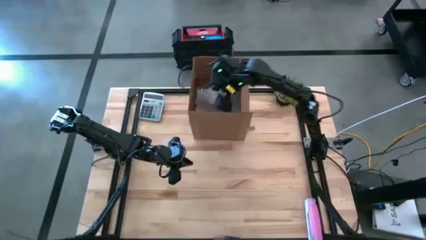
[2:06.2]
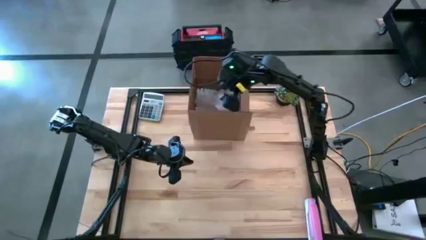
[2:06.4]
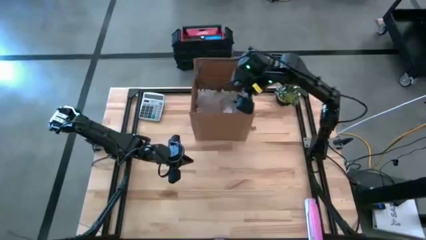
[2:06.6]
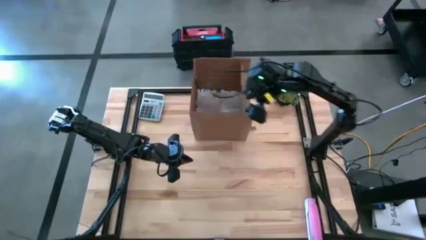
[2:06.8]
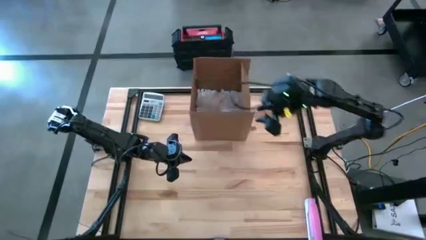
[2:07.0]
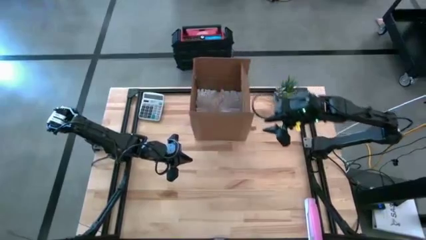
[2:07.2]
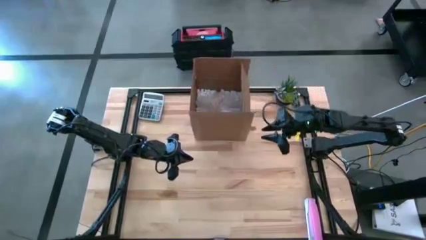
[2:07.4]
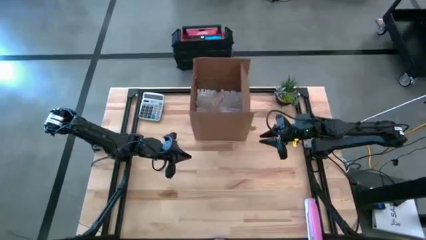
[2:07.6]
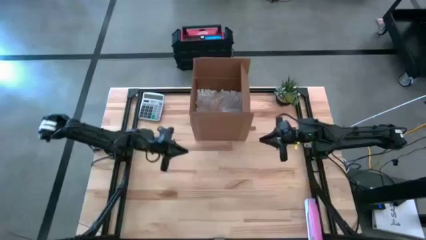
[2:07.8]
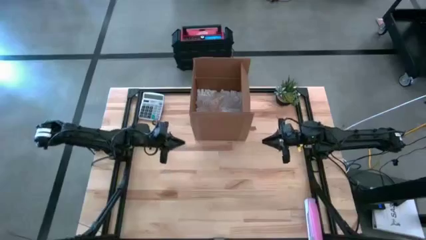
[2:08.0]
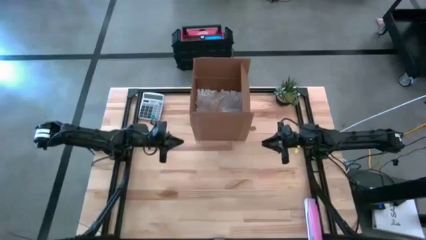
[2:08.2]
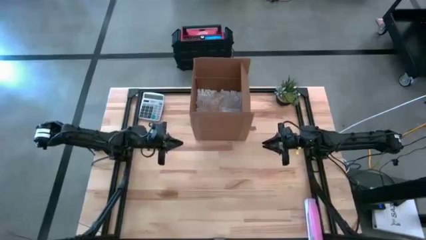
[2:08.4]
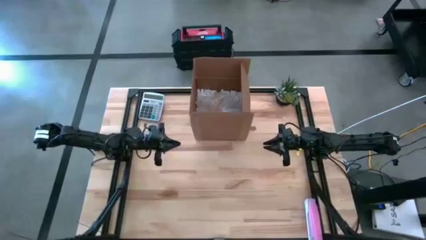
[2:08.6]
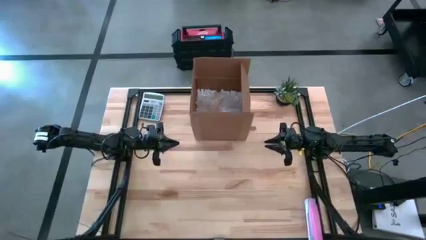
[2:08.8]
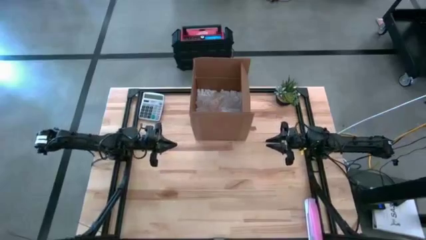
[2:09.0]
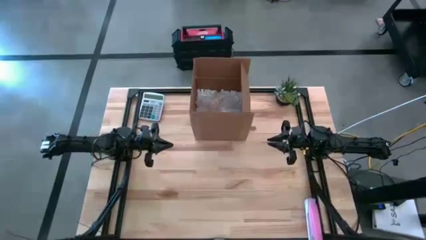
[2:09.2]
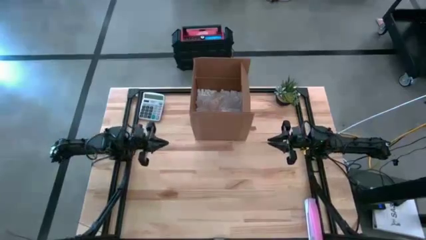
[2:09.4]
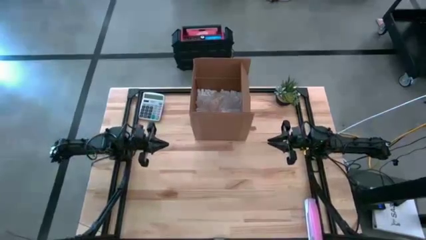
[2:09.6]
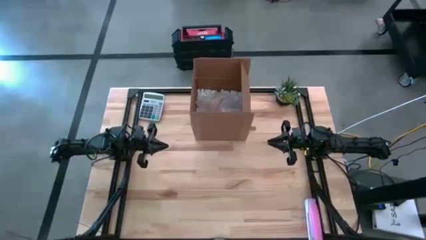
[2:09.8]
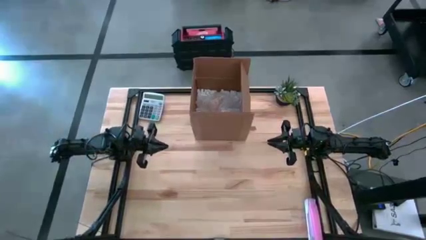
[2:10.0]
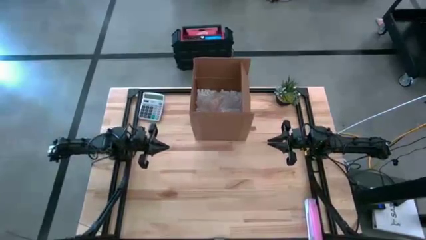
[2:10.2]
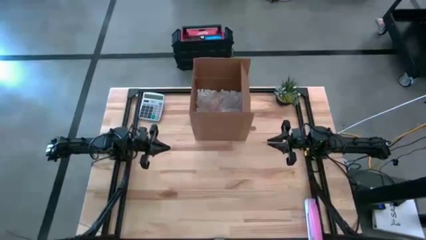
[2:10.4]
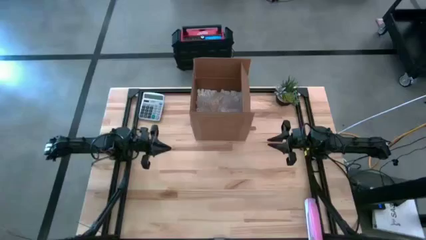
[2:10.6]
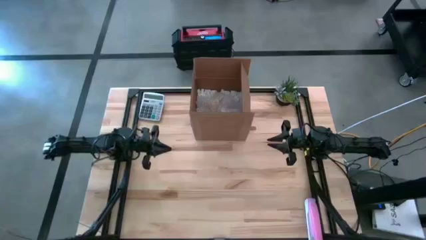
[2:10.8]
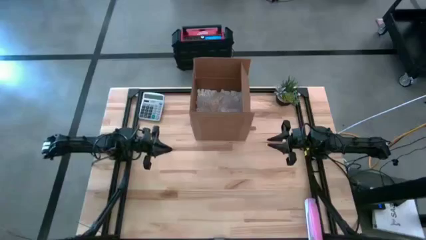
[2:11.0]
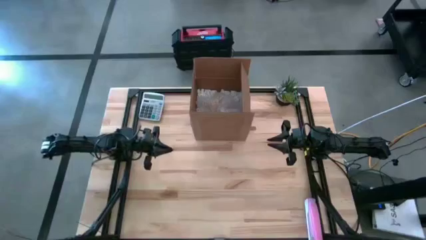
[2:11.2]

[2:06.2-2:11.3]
Task: wrap mug
Return to Home Position

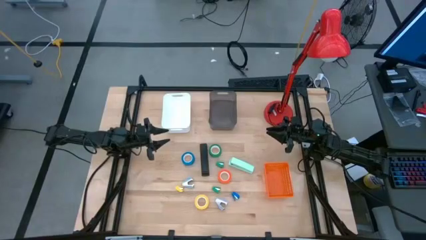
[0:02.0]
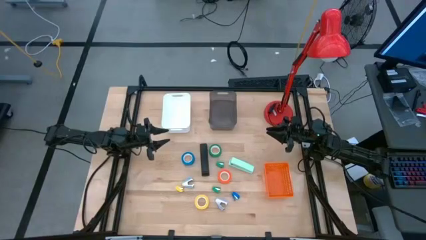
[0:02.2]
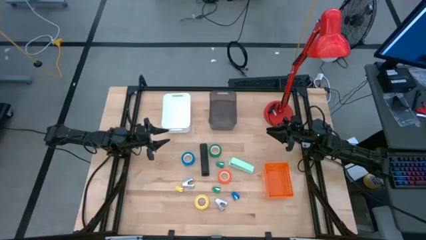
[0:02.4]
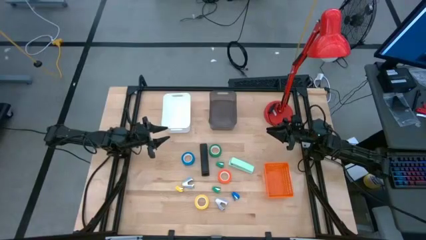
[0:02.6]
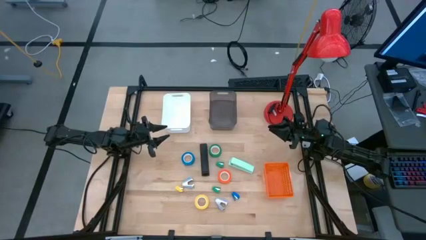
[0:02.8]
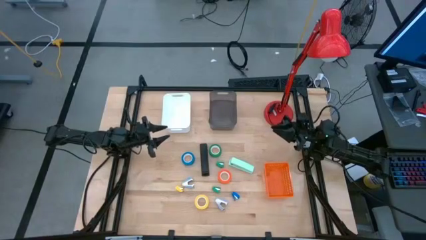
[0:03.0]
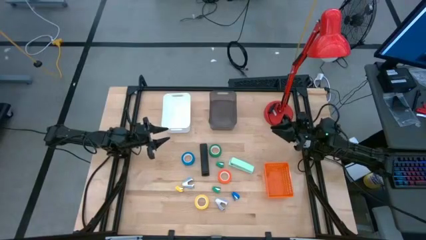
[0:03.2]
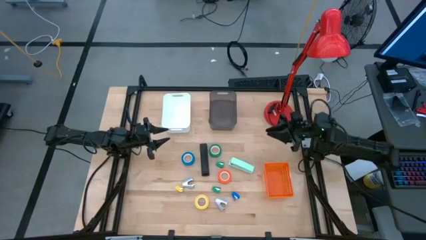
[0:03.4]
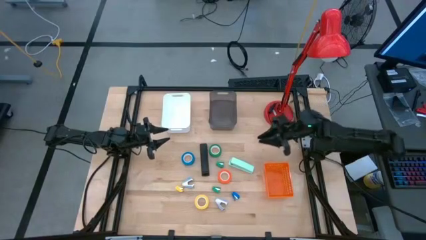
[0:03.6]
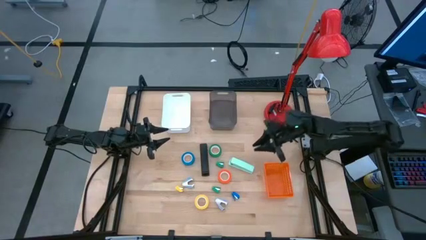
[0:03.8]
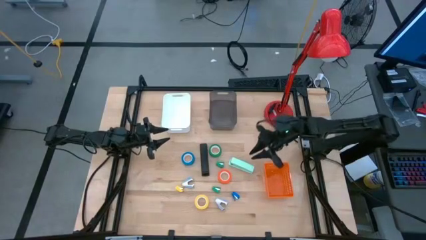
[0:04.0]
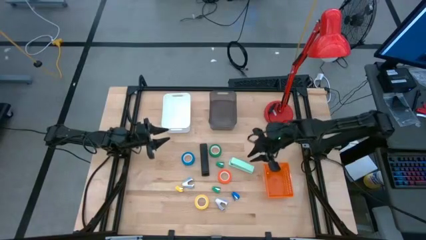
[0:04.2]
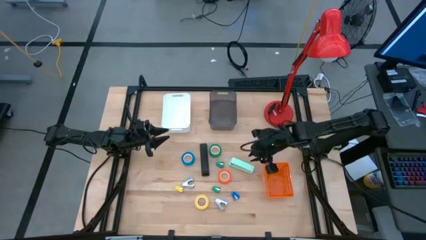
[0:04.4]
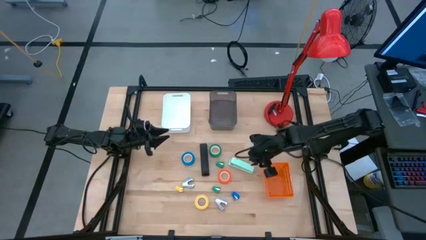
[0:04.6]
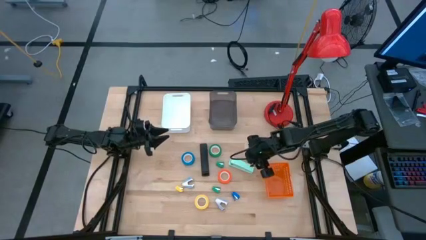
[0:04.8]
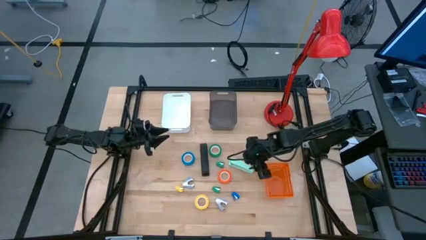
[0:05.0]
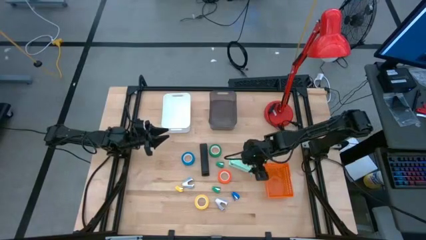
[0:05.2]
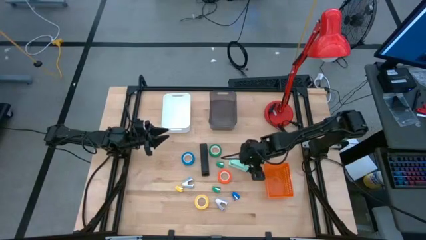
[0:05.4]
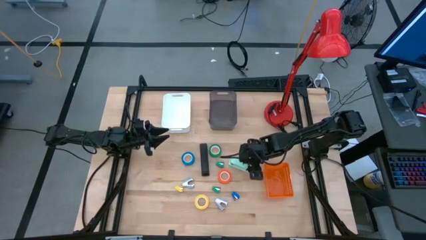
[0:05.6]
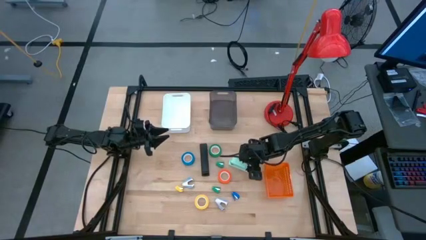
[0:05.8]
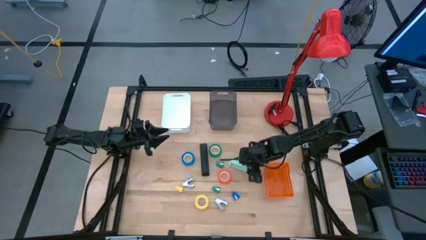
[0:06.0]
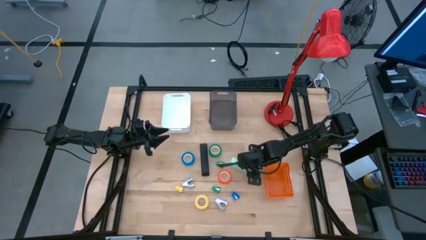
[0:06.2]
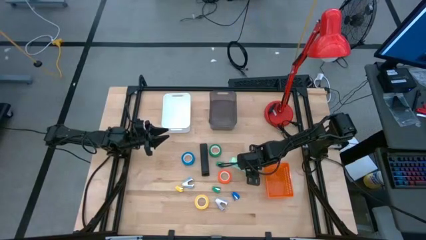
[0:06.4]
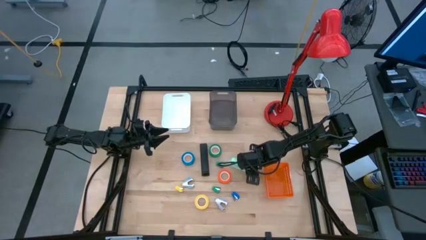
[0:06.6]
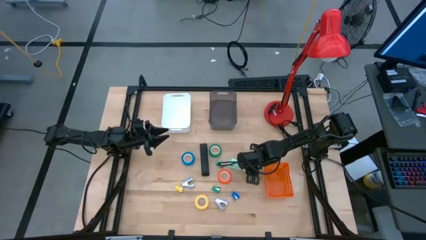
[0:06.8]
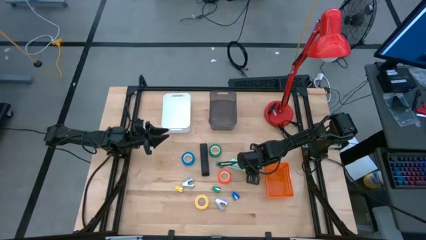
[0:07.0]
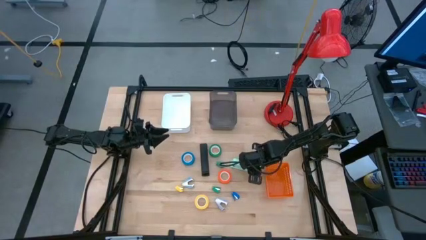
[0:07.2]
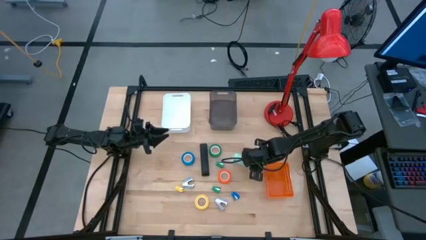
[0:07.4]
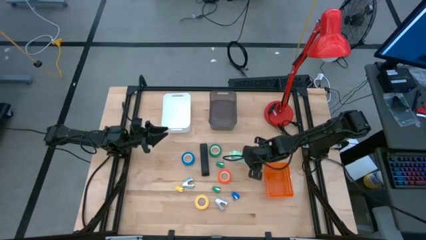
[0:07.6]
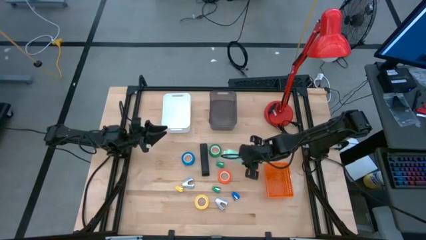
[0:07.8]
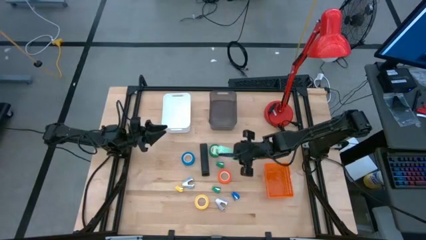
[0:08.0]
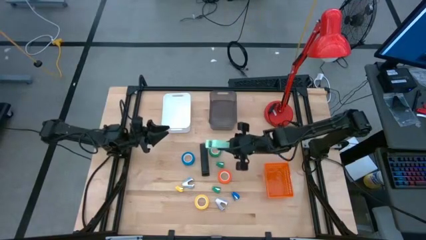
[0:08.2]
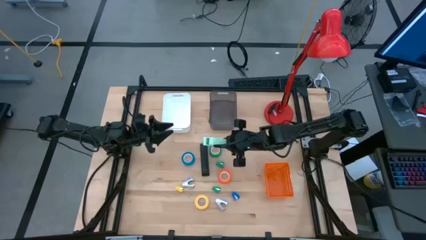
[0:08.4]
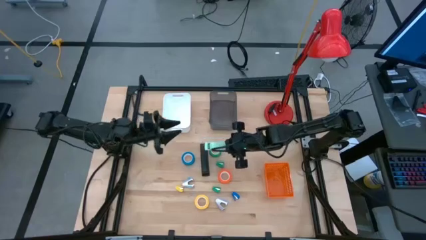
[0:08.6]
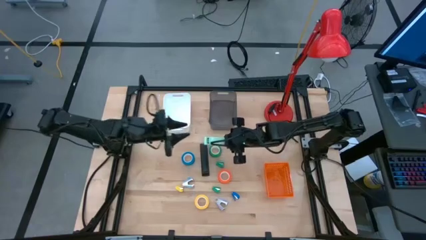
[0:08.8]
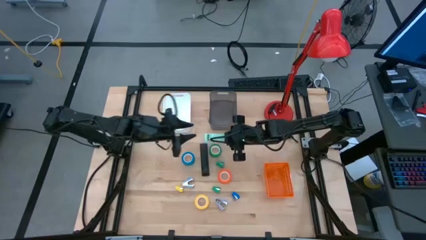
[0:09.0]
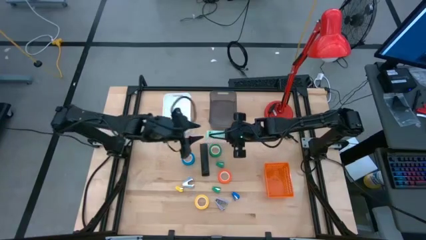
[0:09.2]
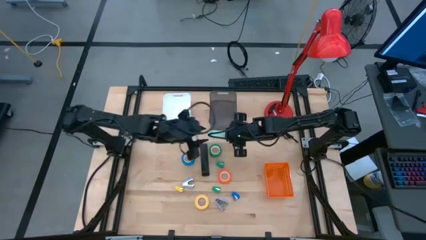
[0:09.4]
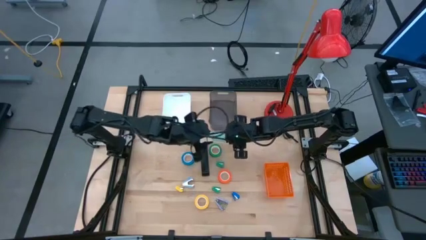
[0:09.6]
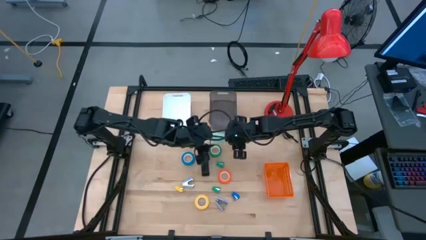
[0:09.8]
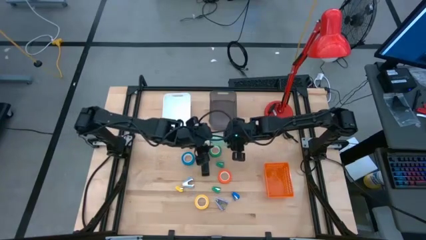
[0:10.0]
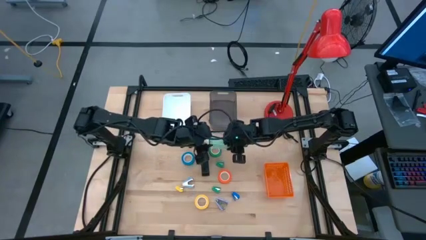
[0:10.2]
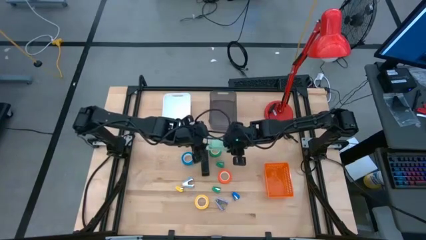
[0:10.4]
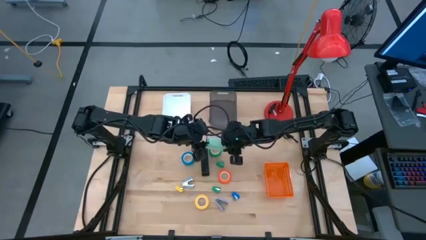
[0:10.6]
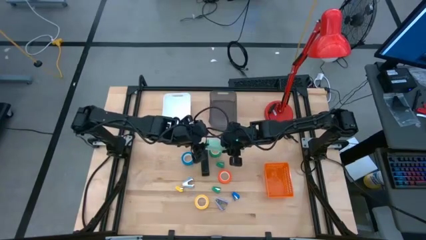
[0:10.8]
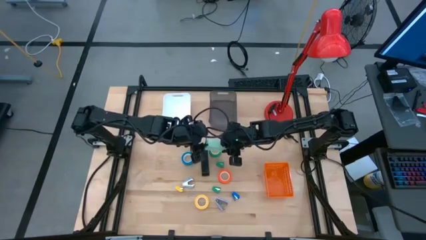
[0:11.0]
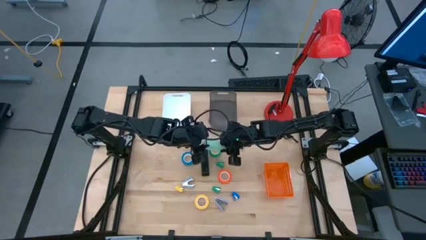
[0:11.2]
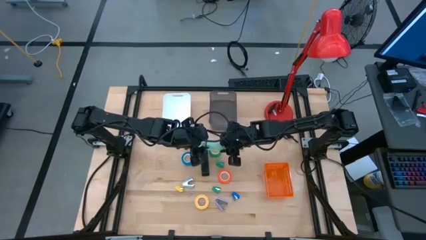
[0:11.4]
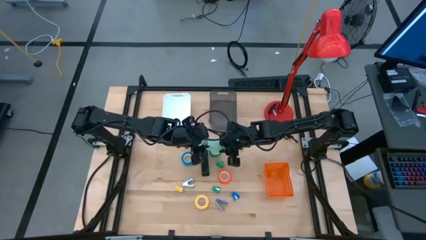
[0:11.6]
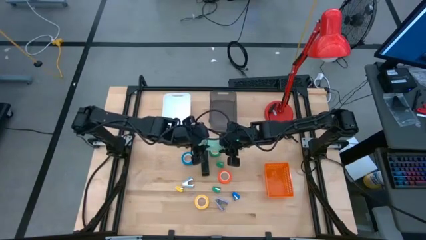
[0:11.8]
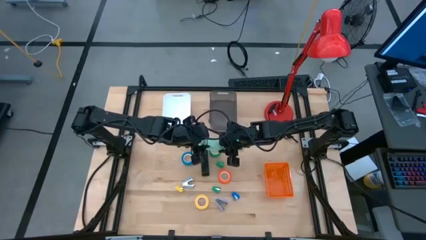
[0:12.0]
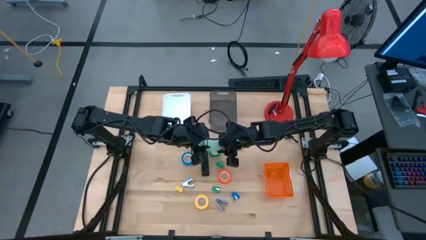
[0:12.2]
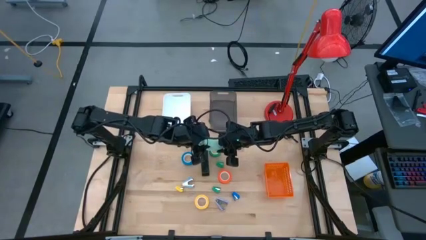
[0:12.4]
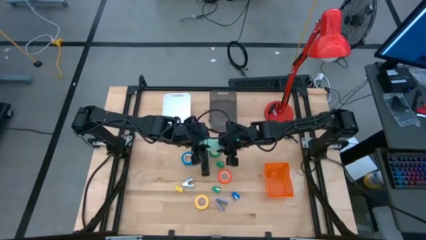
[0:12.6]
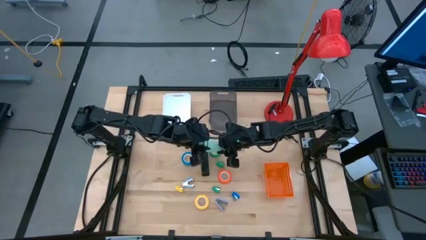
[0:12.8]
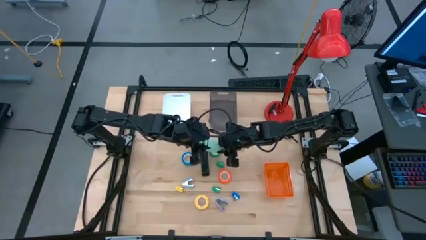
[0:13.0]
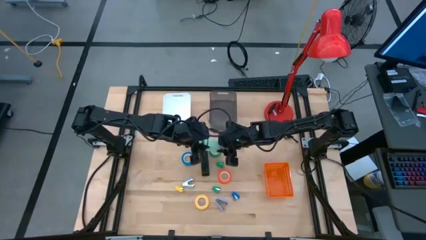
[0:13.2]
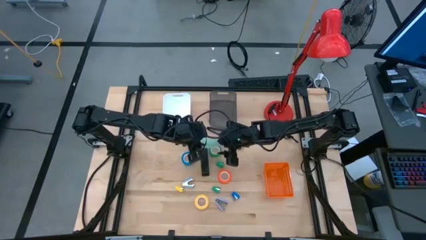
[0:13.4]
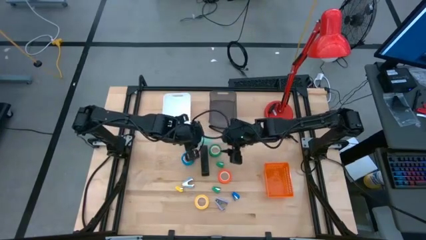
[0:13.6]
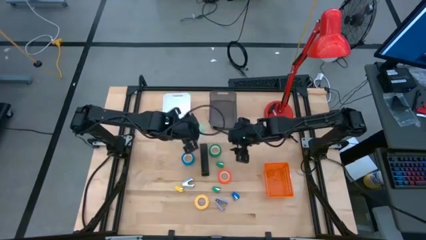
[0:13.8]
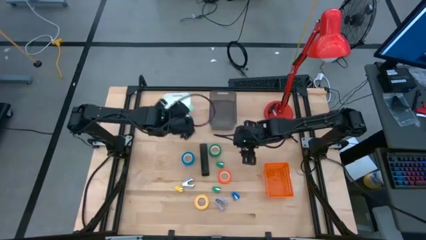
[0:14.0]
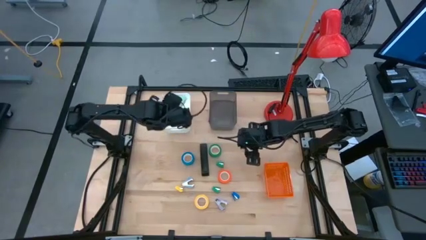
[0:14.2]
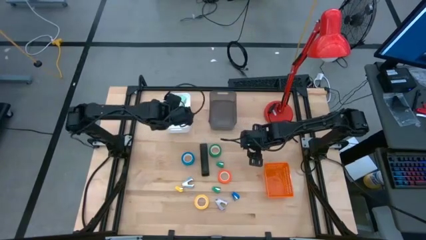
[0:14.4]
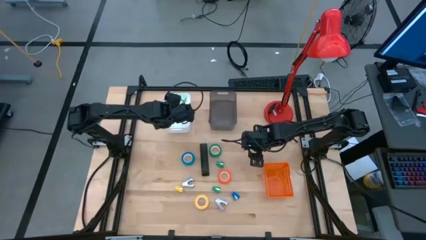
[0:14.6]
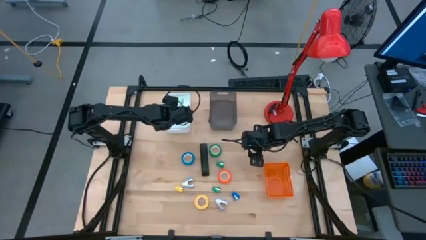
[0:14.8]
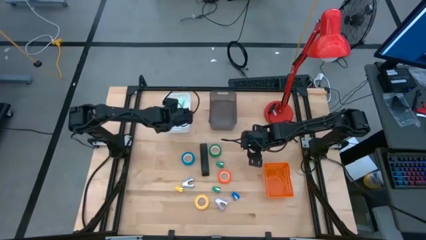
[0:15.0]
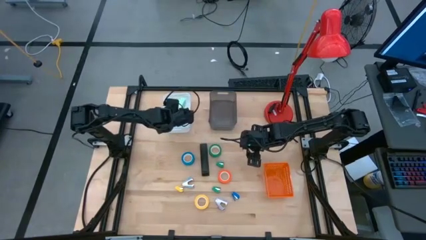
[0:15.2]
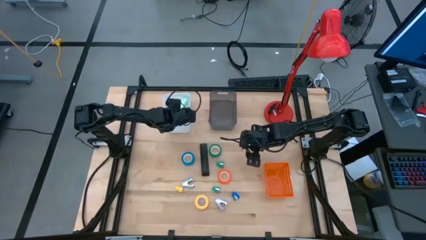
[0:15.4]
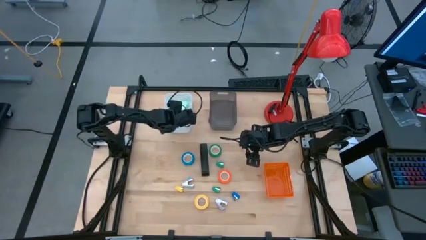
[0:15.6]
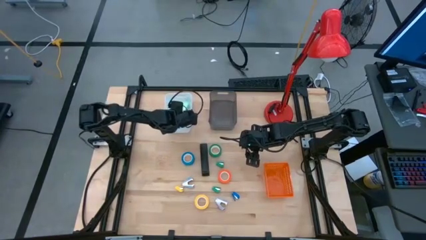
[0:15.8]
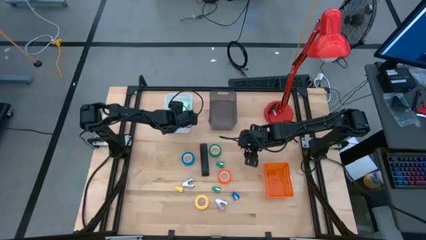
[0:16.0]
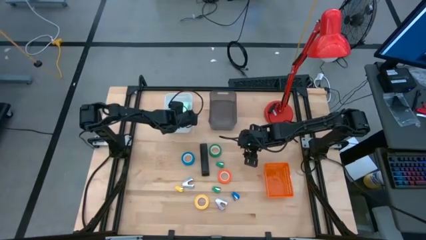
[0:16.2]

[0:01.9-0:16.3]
Task: Pick and place Stapler, Stapler remover, tape
Put the light blue stapler into the white bin
